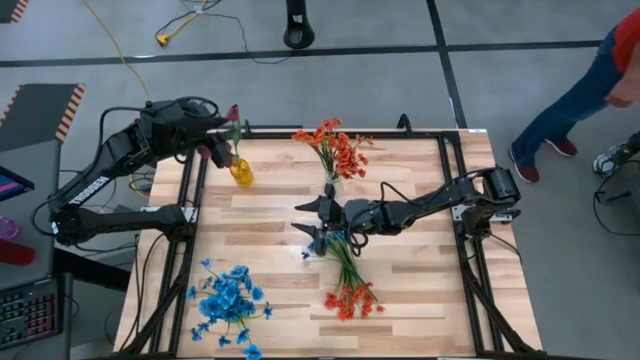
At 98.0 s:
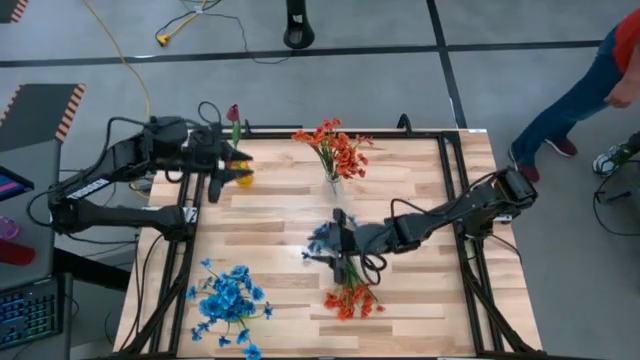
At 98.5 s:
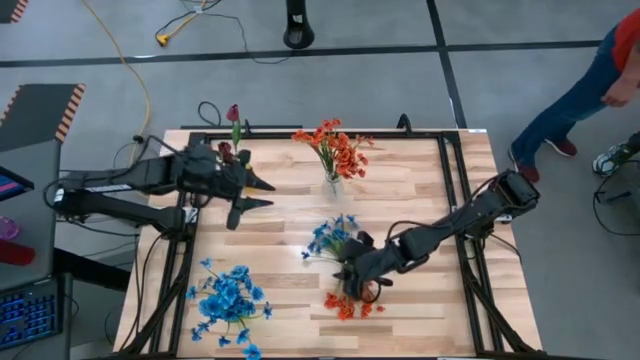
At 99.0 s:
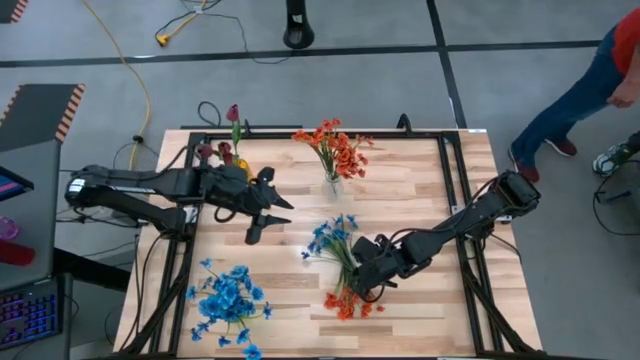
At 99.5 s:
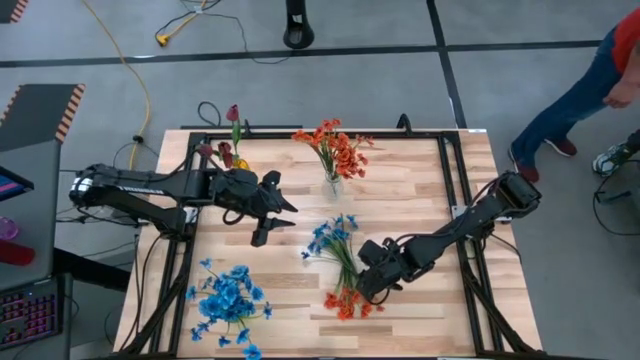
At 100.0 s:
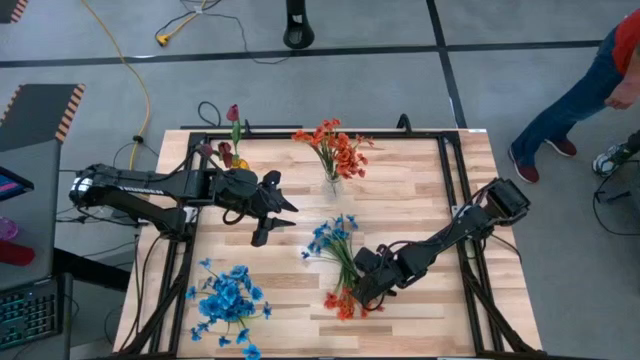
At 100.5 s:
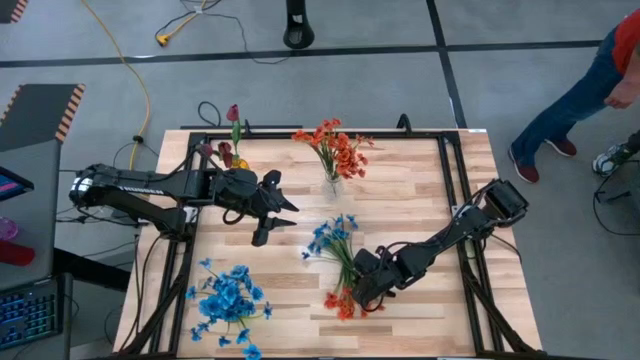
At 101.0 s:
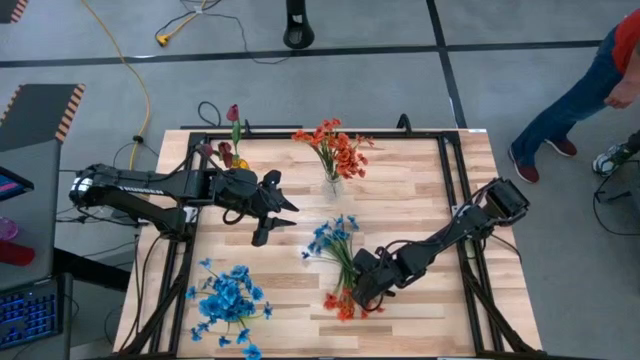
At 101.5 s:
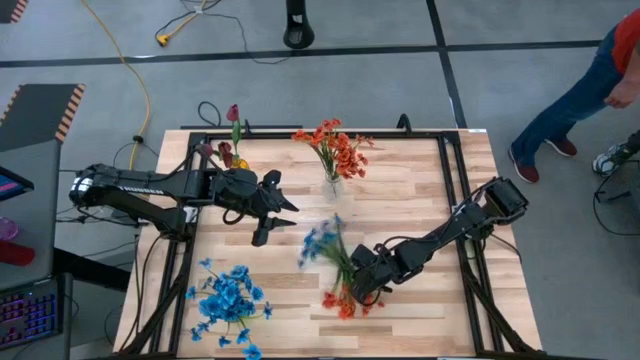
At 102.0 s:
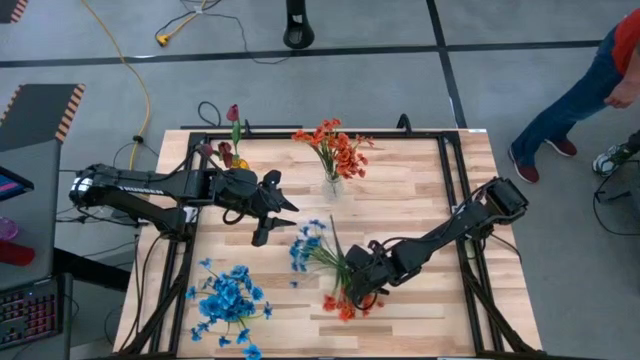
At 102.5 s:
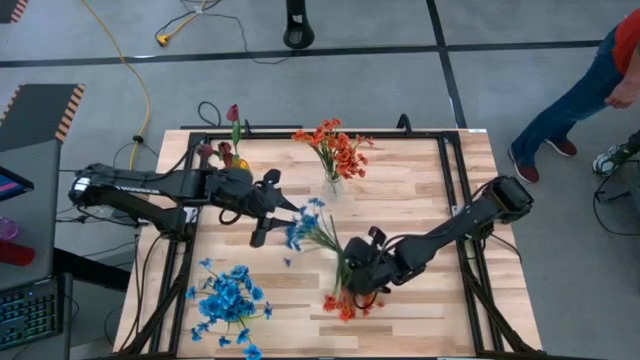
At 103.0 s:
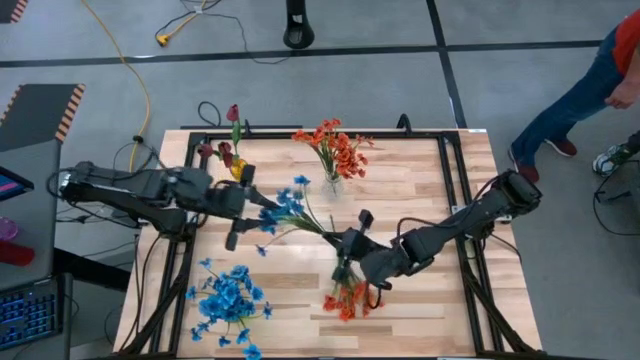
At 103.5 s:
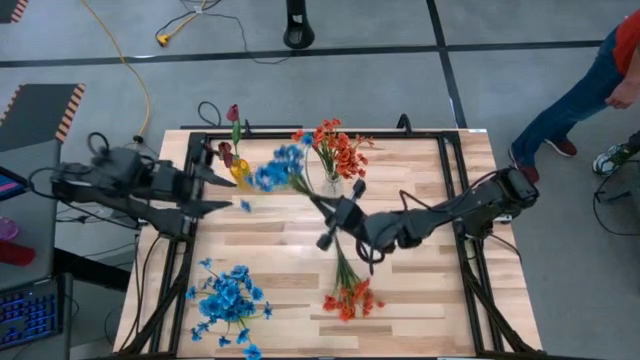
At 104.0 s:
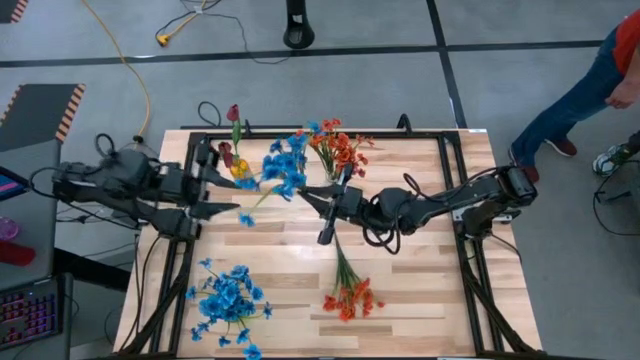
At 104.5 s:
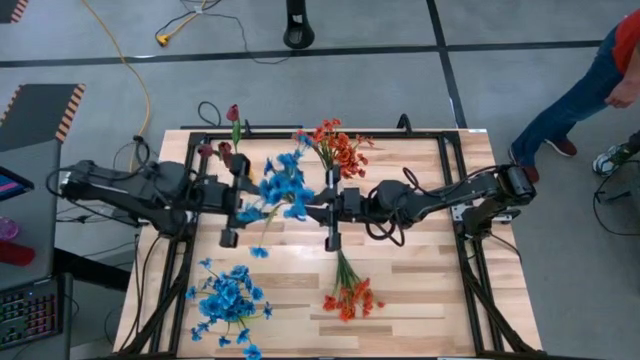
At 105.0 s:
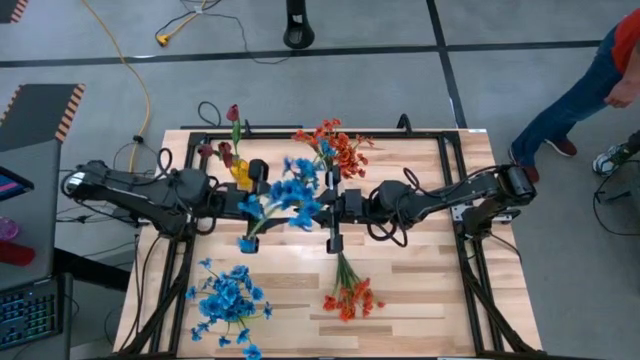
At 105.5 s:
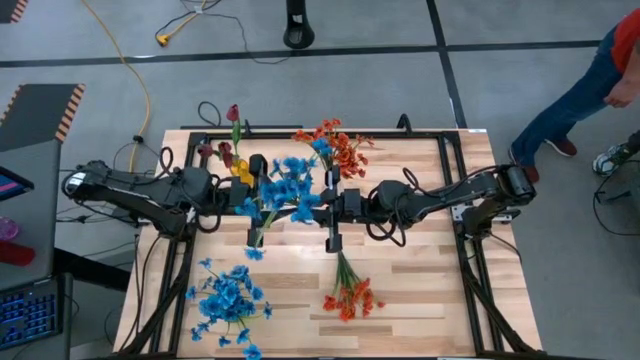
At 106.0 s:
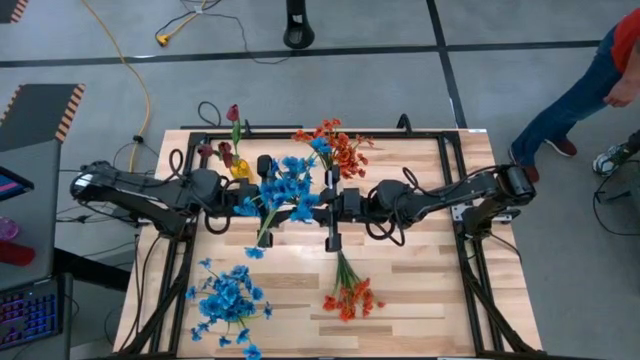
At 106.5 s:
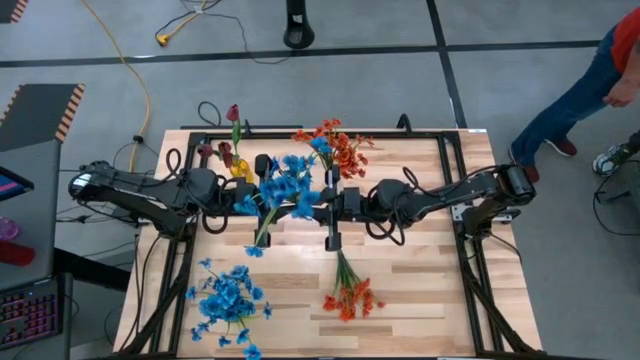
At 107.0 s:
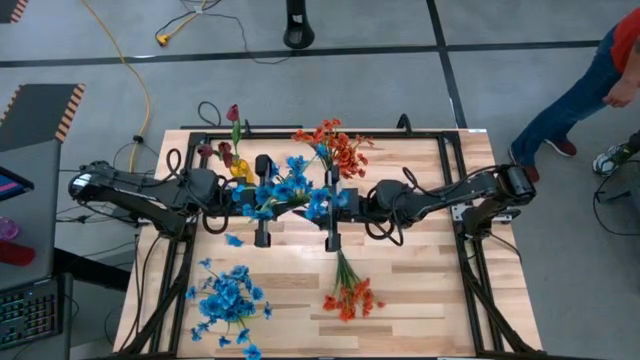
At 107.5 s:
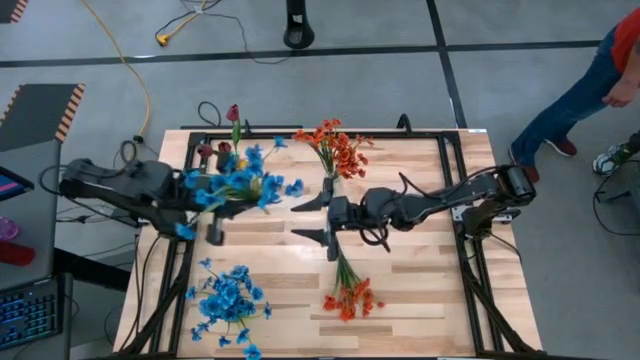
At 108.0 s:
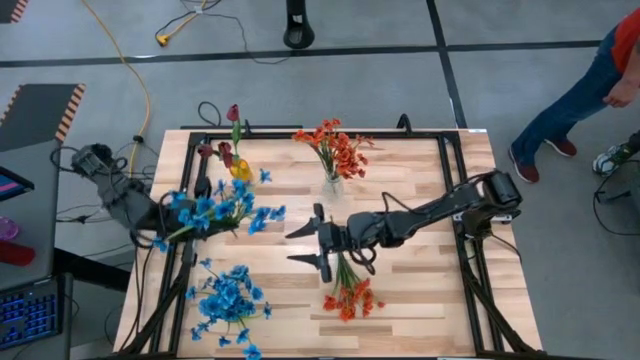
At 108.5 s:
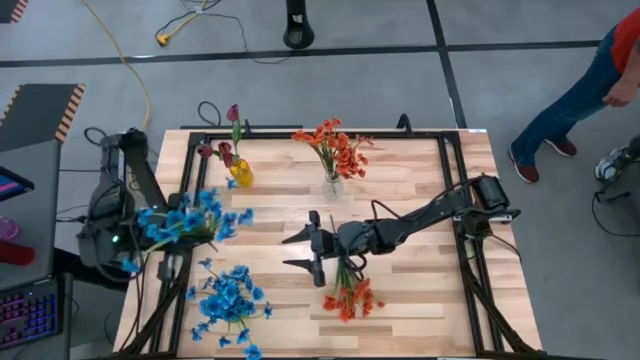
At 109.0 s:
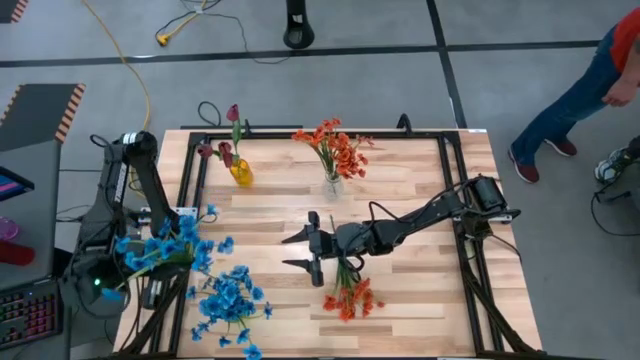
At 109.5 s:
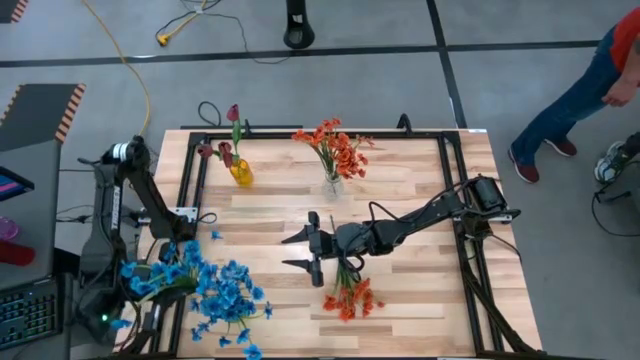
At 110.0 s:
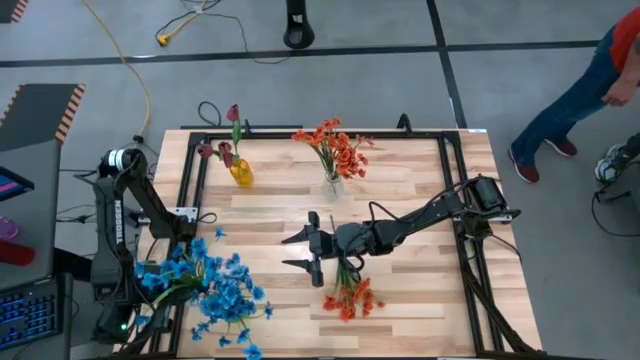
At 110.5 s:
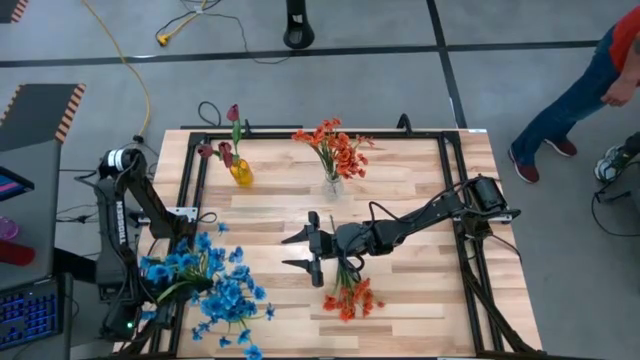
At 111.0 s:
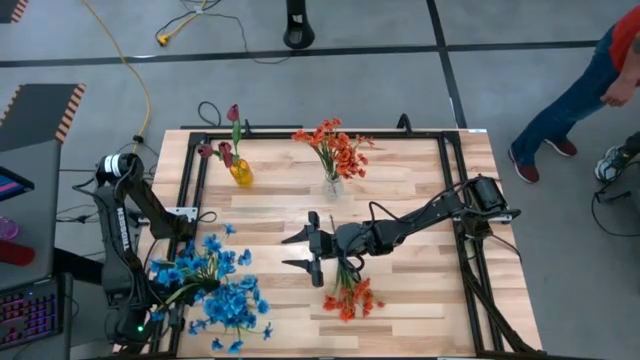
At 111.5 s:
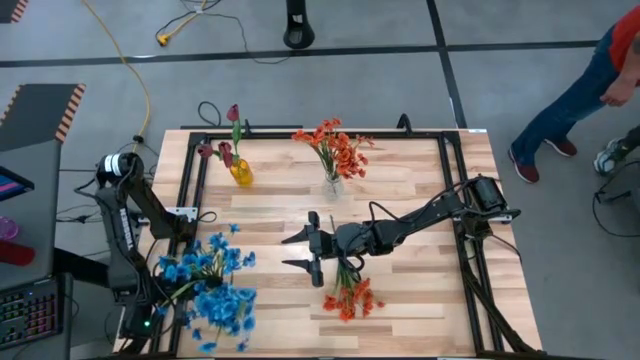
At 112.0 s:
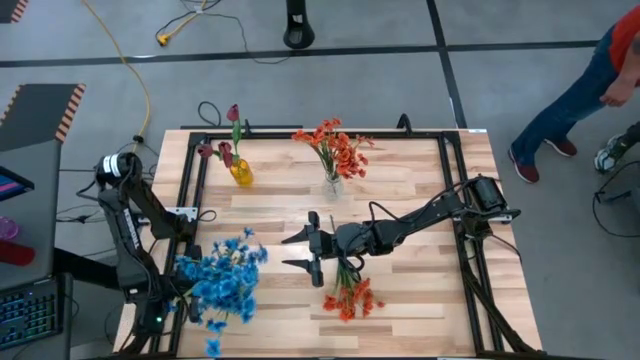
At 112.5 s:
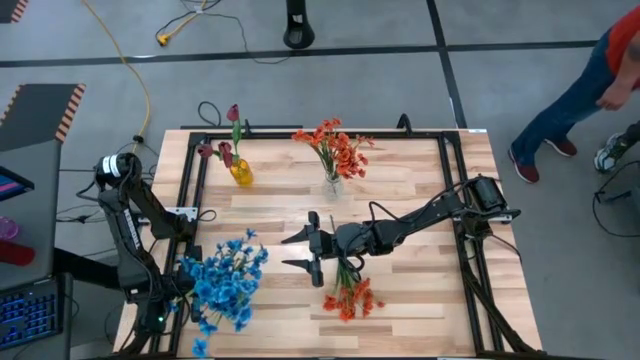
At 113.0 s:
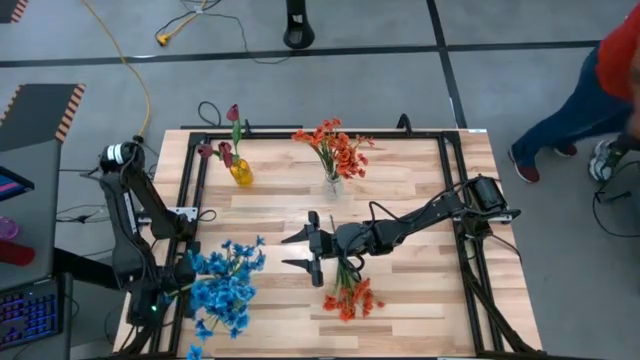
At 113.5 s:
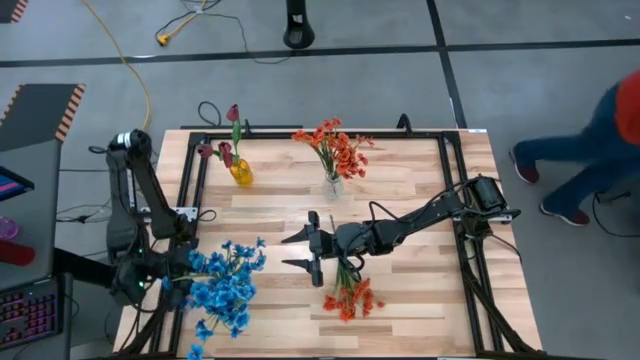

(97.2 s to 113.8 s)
Task: Sort flowers into vase by color
Put the blue flowers into the green vase

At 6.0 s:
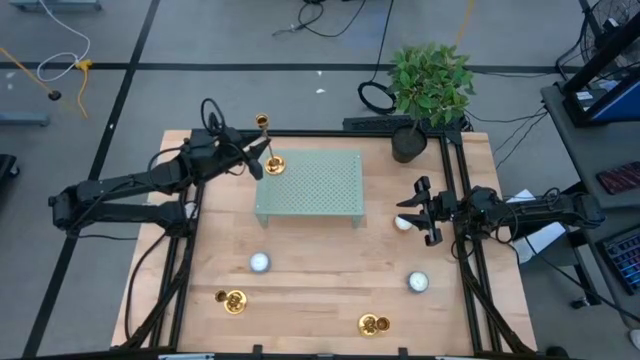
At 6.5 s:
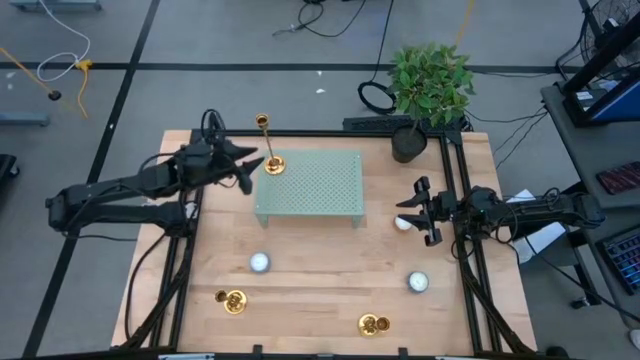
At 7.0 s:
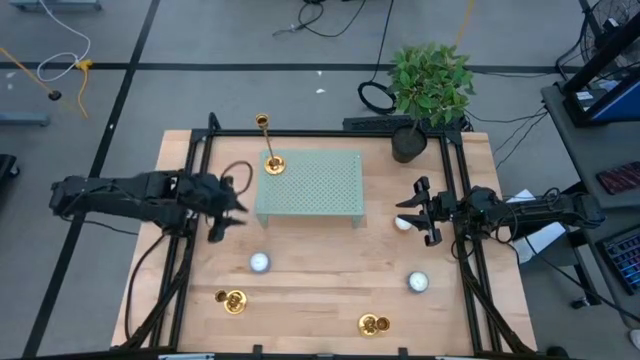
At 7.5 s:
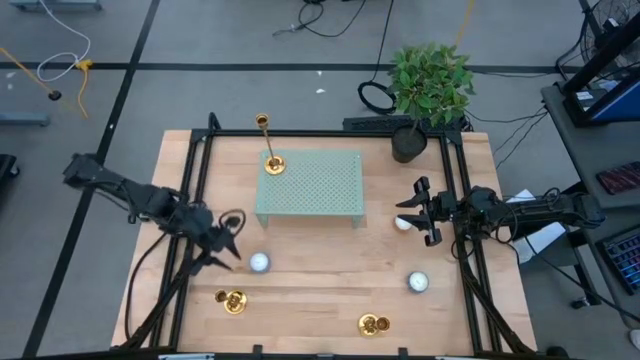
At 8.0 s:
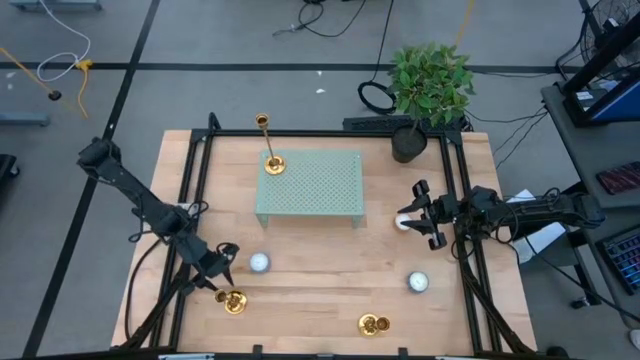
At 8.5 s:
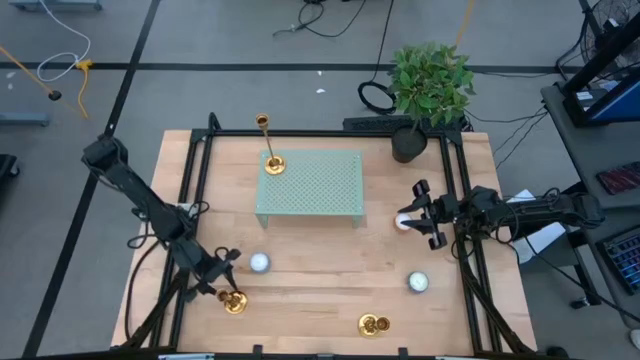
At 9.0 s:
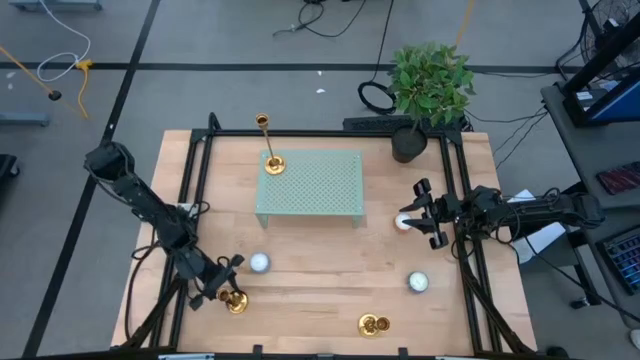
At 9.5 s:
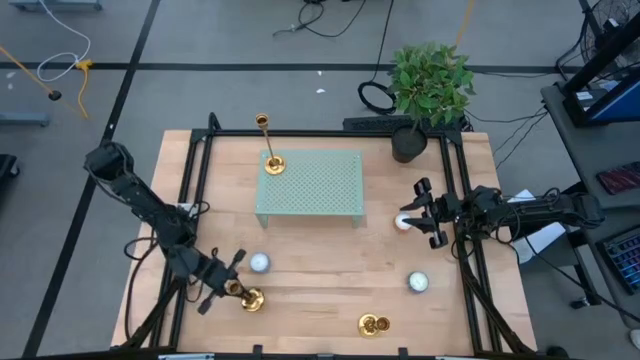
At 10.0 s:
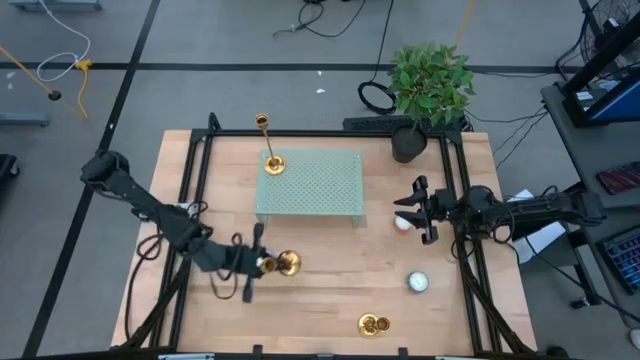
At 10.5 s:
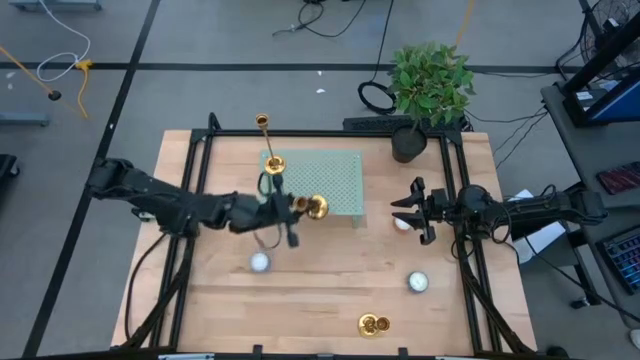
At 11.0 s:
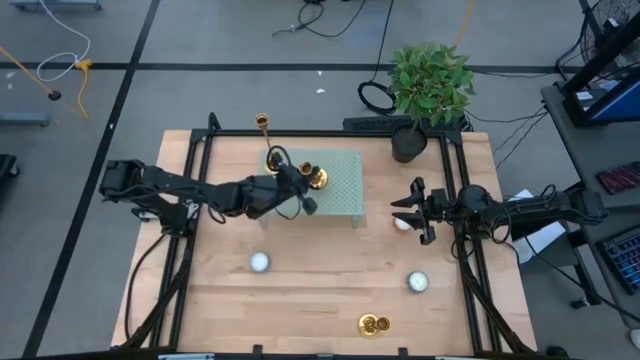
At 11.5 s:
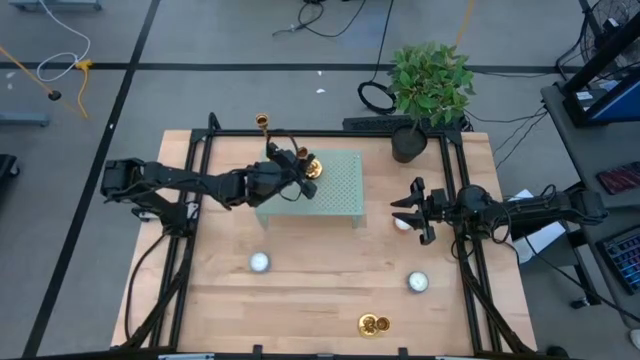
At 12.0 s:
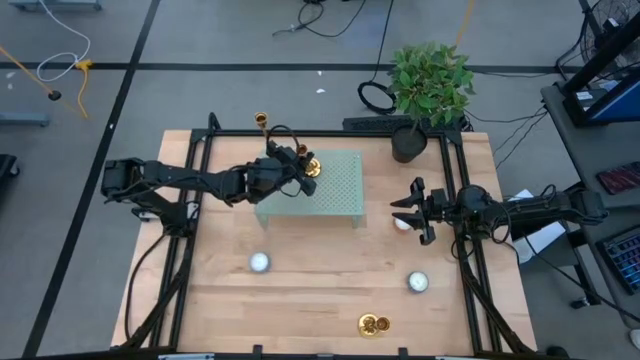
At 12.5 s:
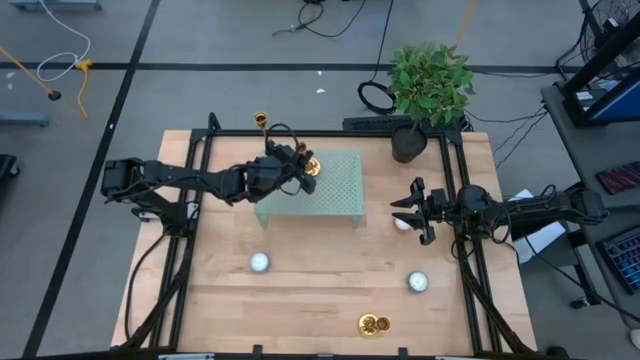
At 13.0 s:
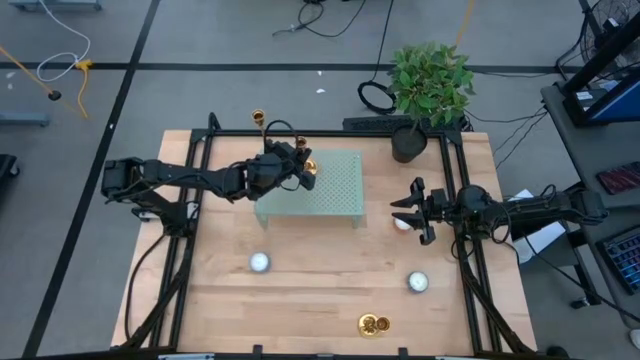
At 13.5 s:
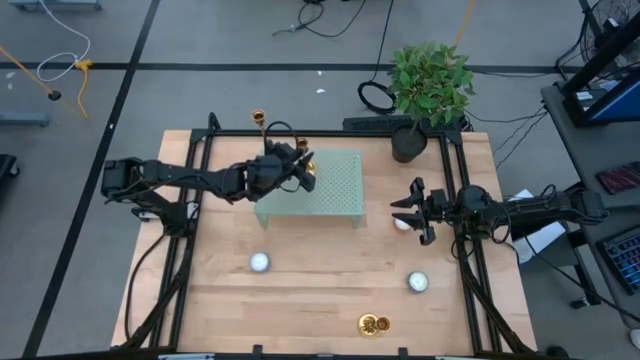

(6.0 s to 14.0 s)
Task: Pick & Place candle stick holders
Put the top gold candle holder on top of the shelf
